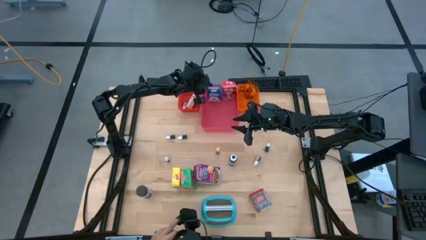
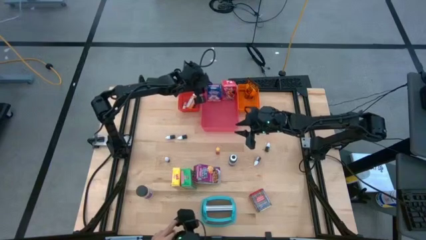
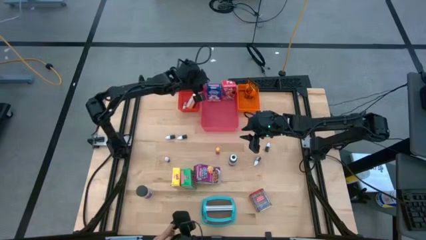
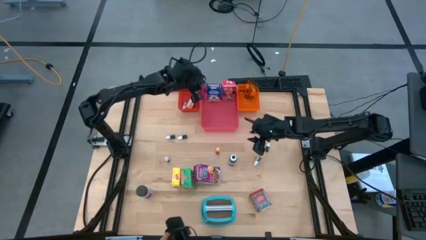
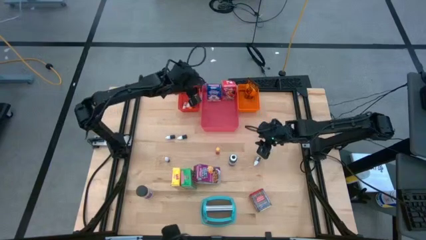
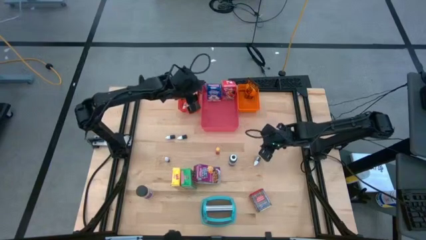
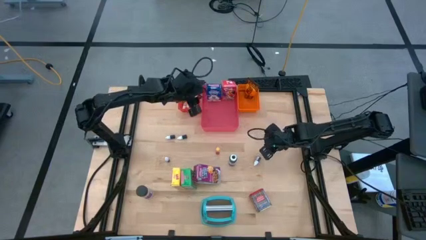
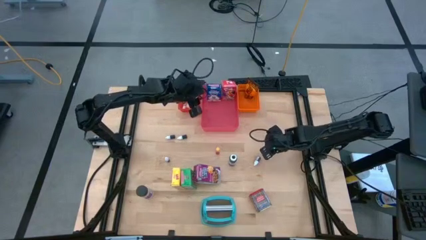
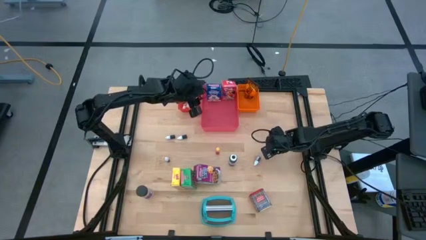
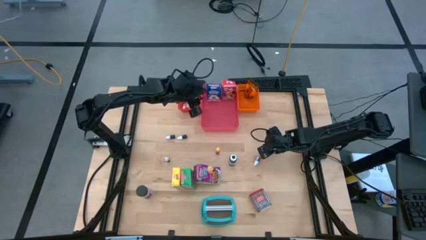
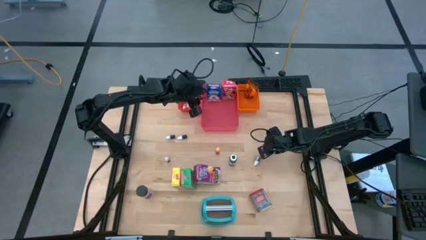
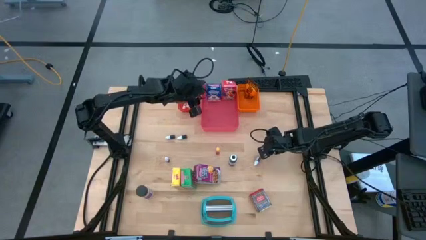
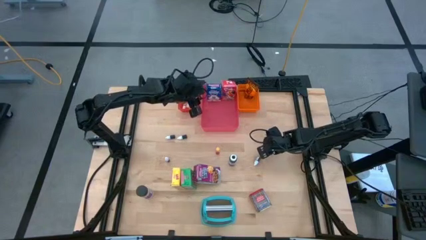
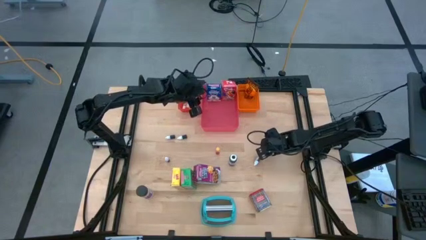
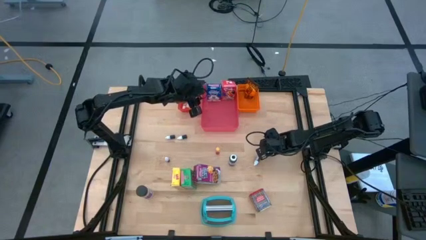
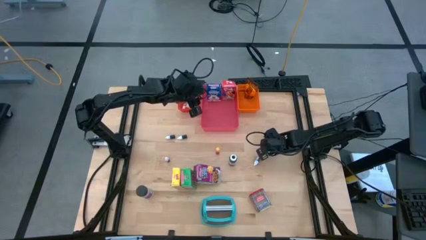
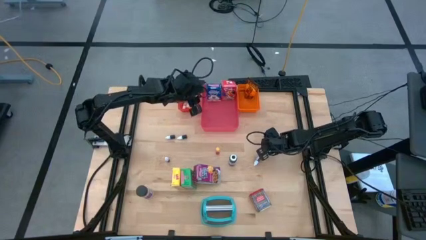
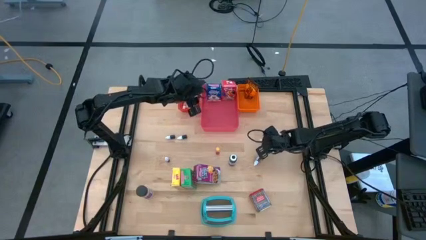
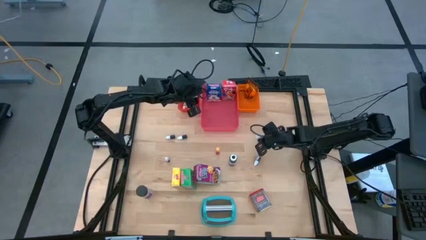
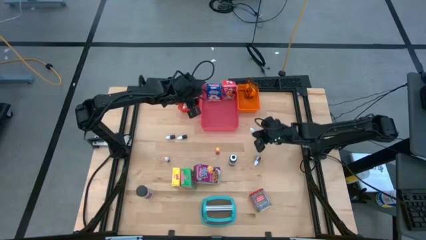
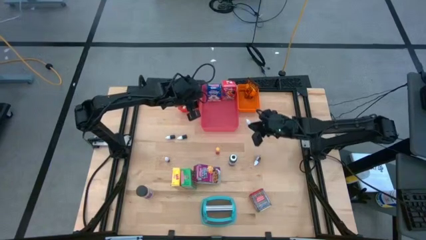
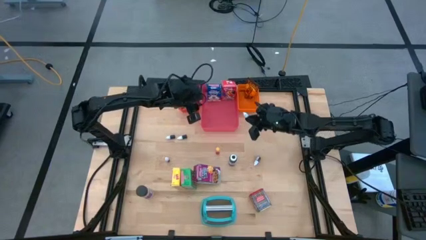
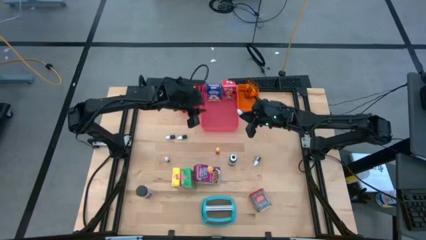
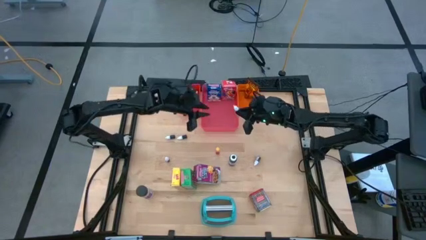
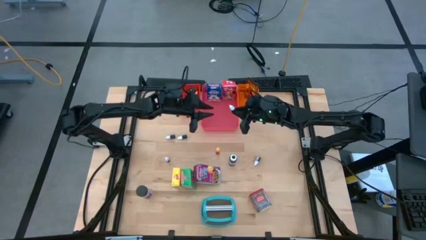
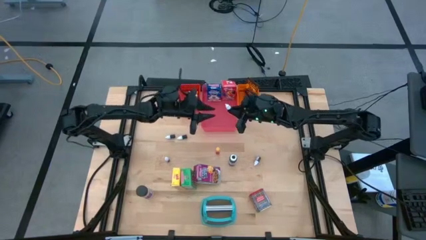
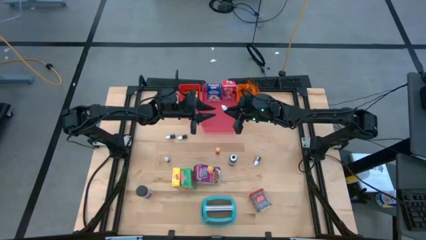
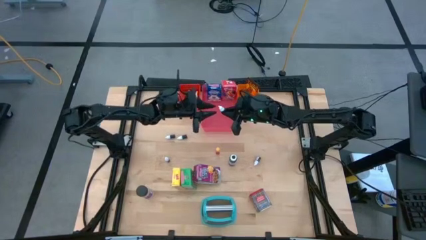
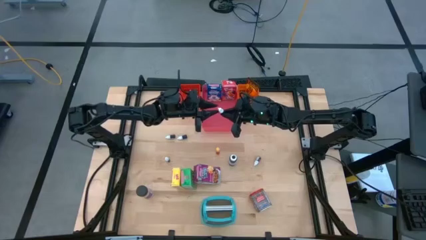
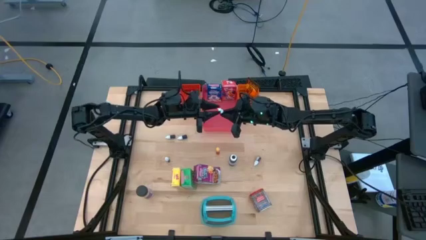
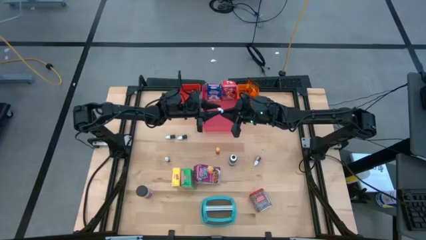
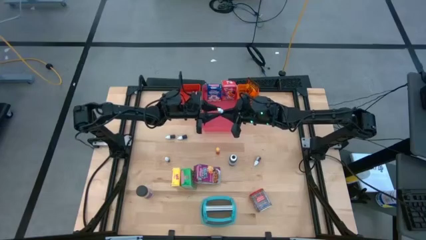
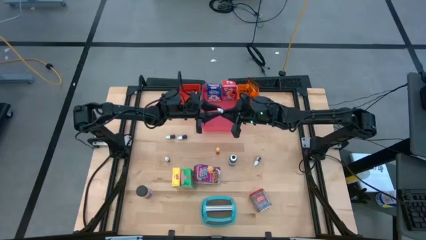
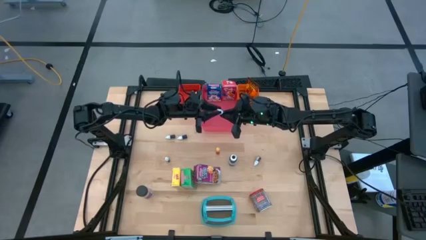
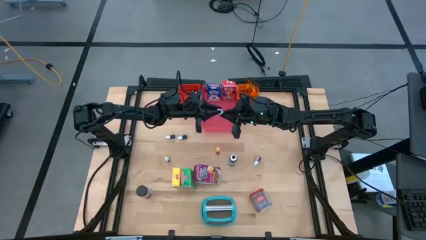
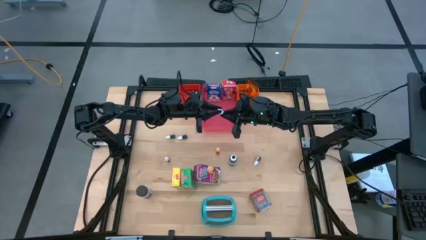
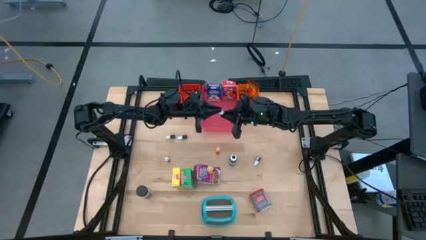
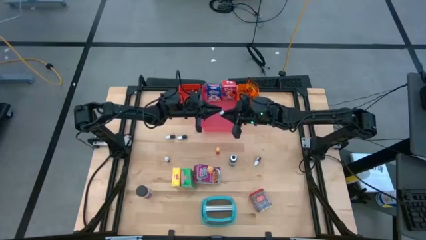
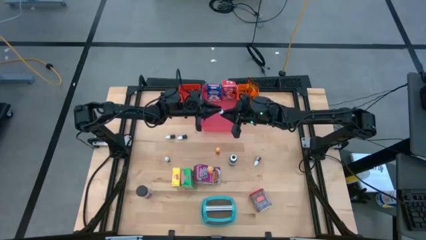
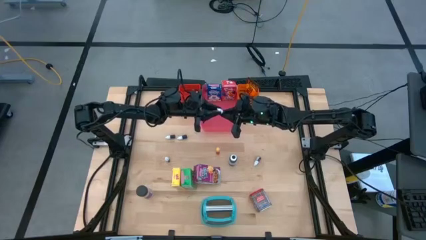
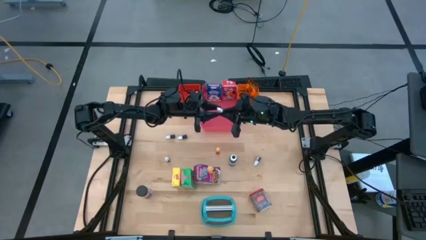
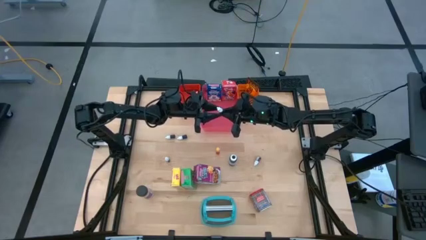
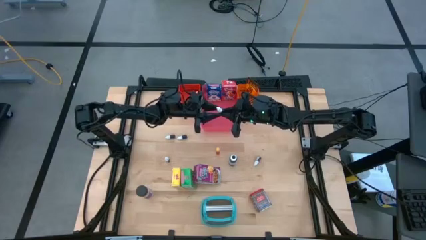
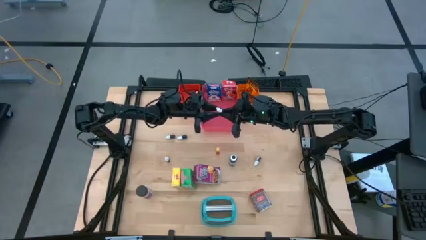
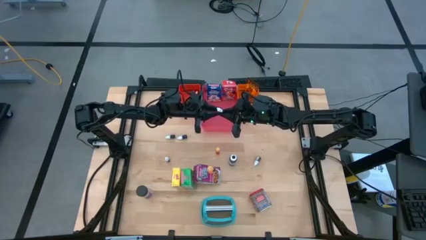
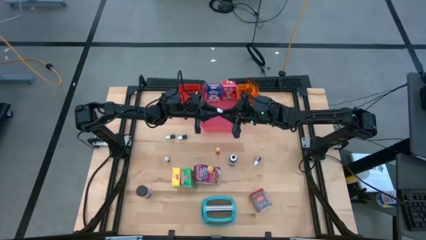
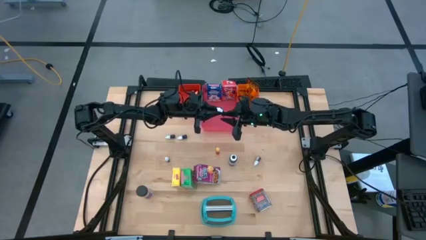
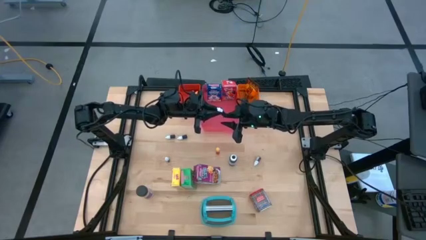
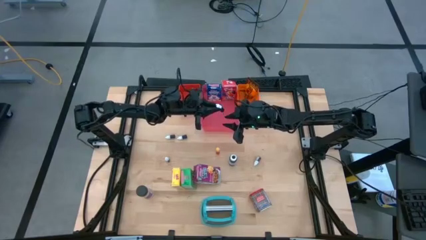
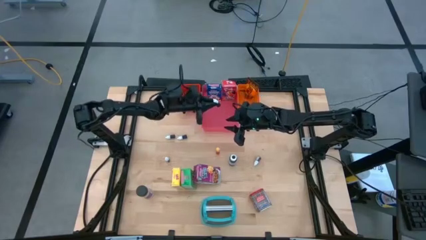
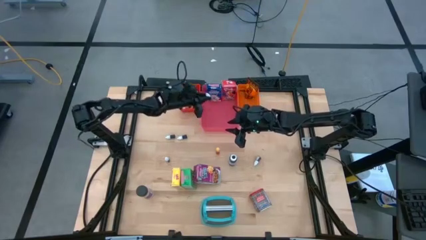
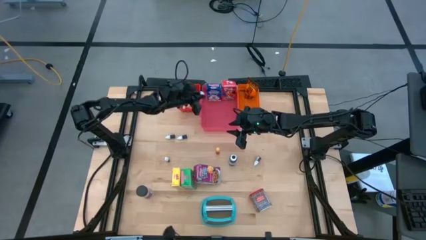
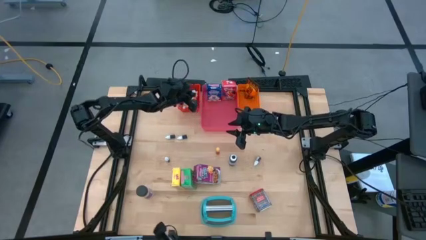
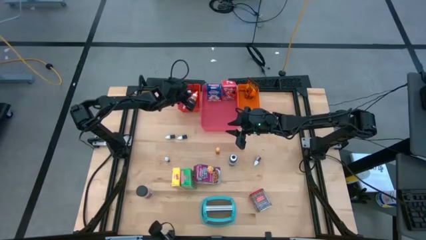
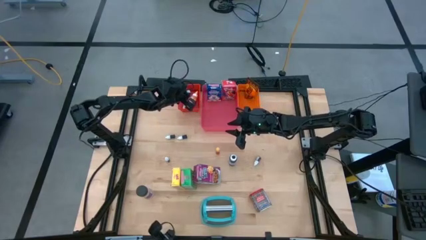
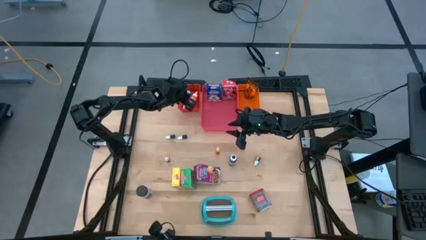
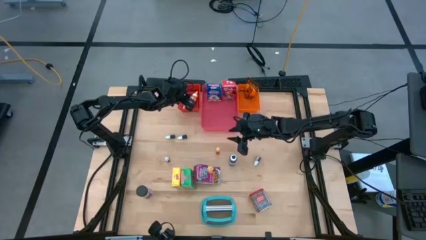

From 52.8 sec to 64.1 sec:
Task: Pick & Place Kitchen Items
Put the small green food coloring bottle into the red bin

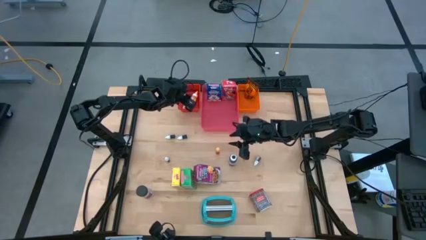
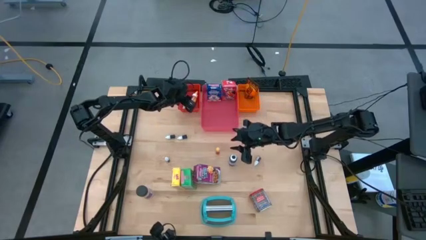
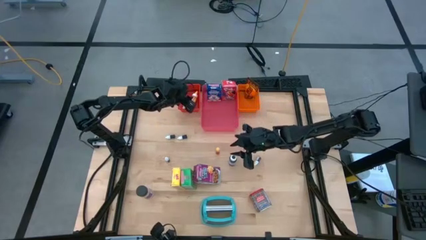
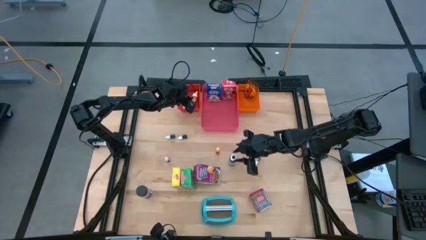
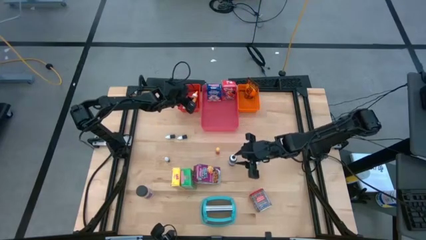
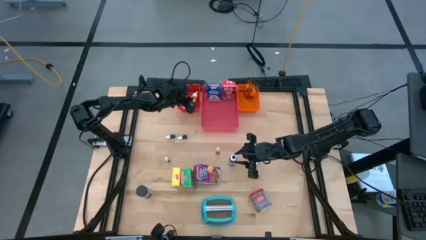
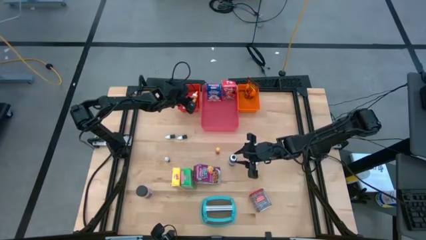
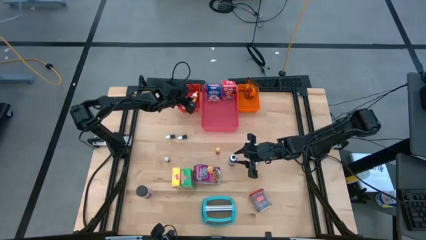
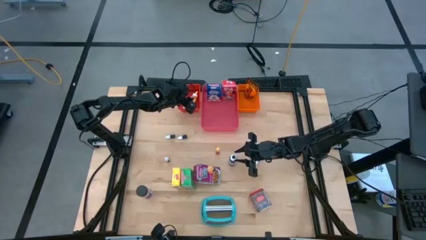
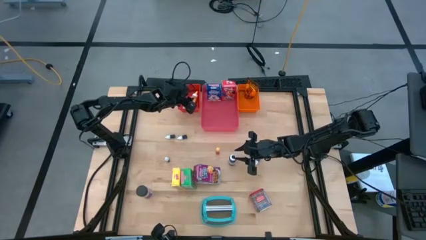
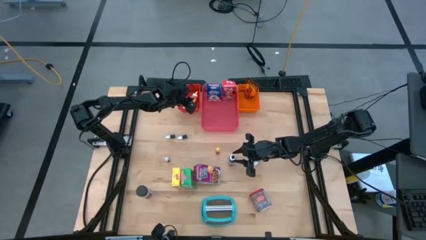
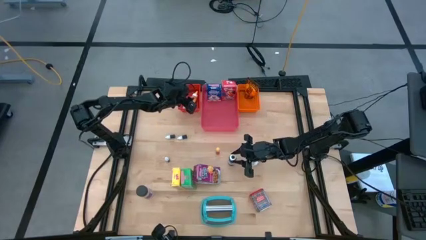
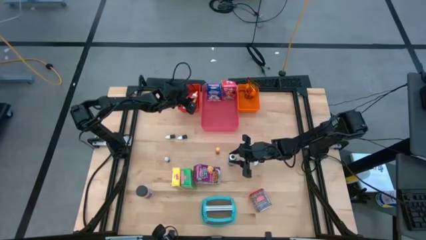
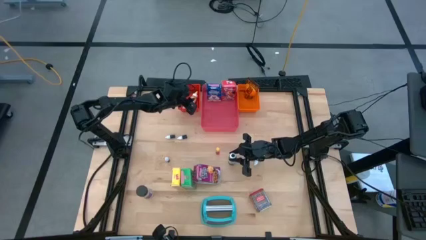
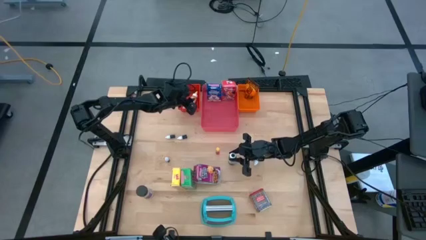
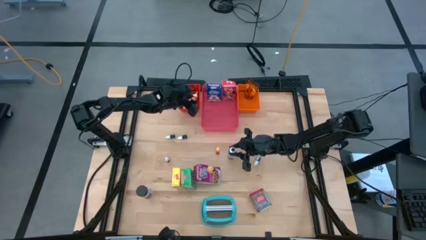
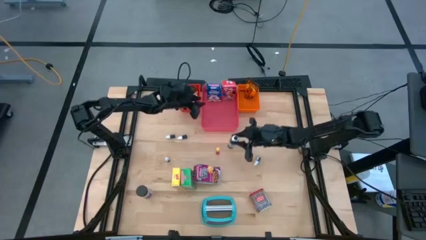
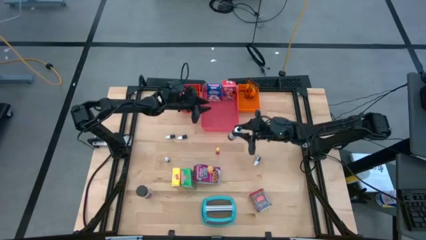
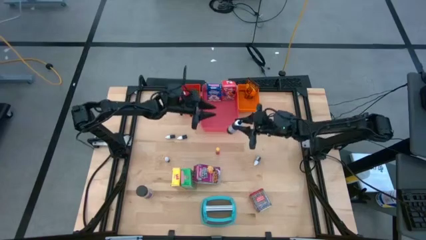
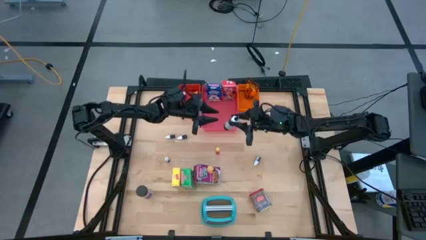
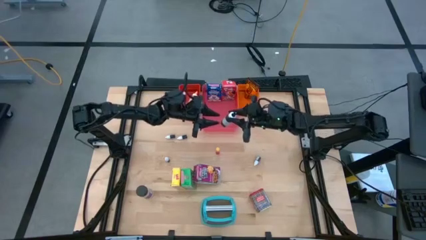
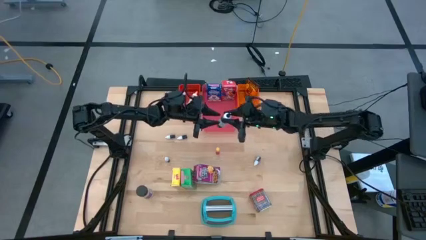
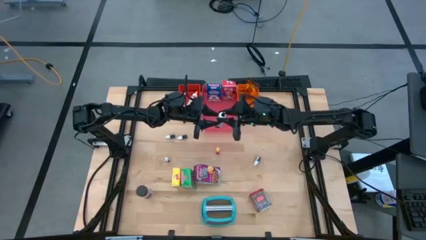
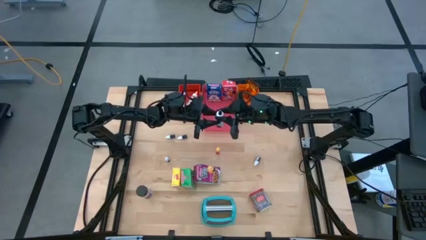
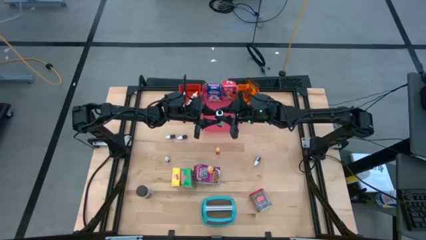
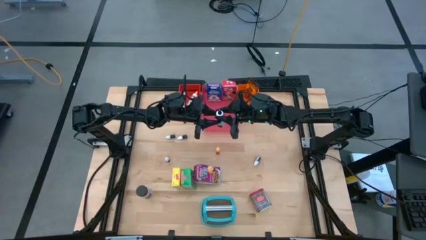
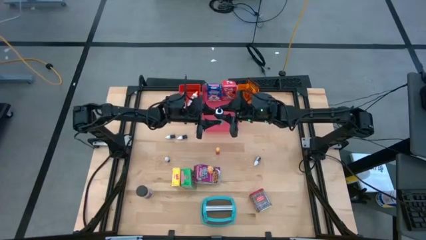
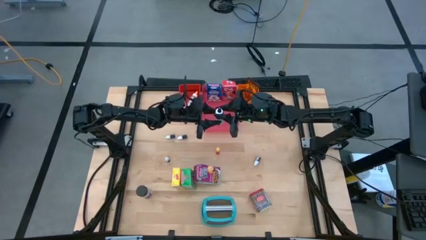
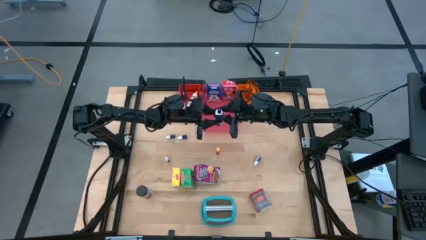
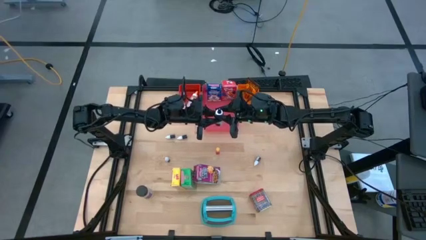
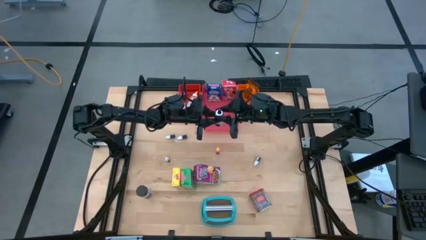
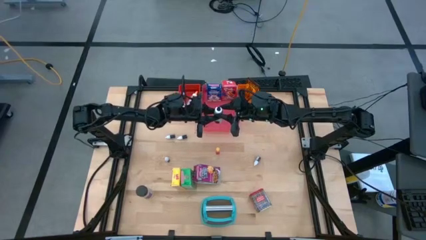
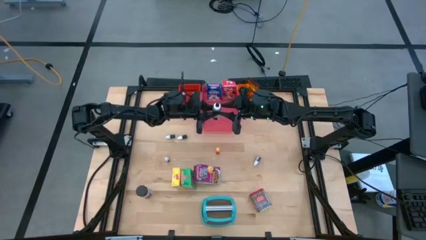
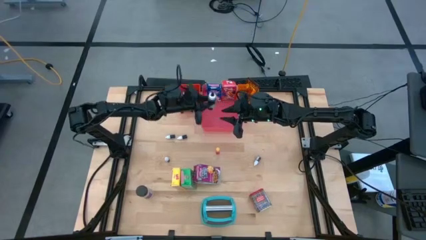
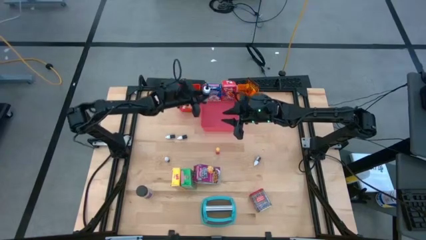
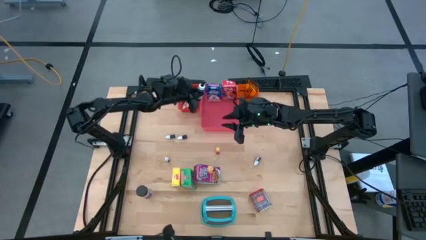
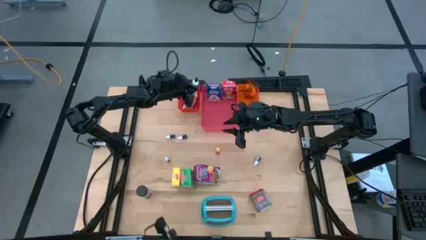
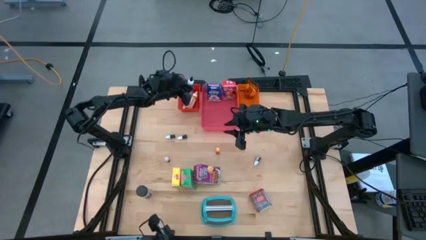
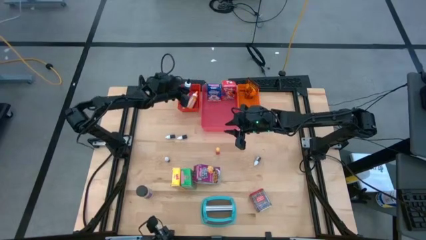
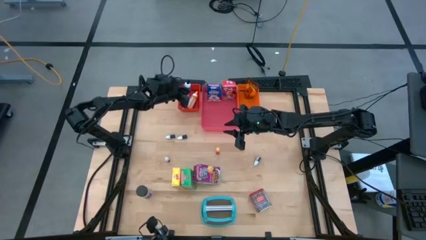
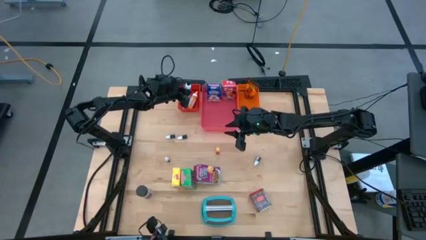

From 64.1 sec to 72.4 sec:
Put the large black food coloring bottle into the red bin
